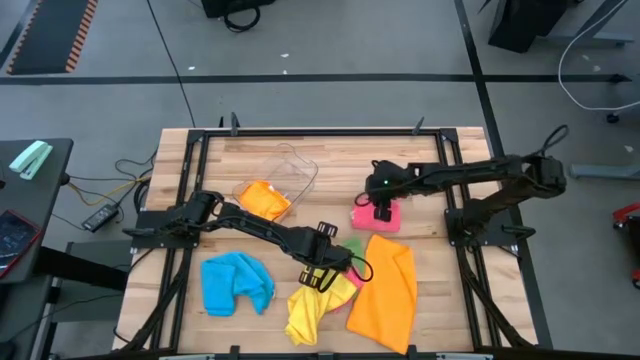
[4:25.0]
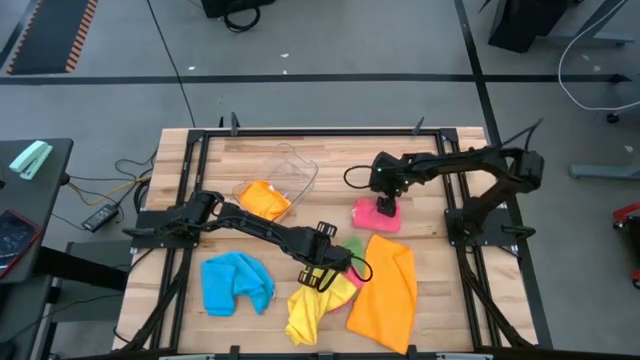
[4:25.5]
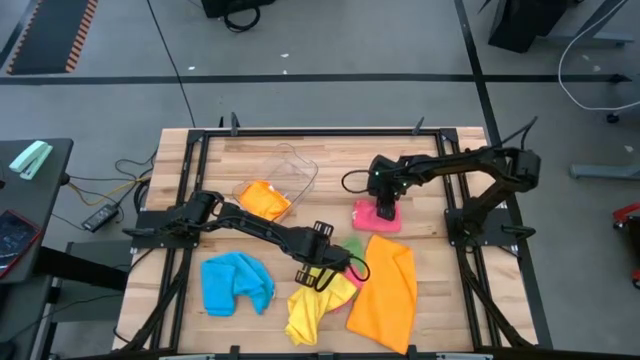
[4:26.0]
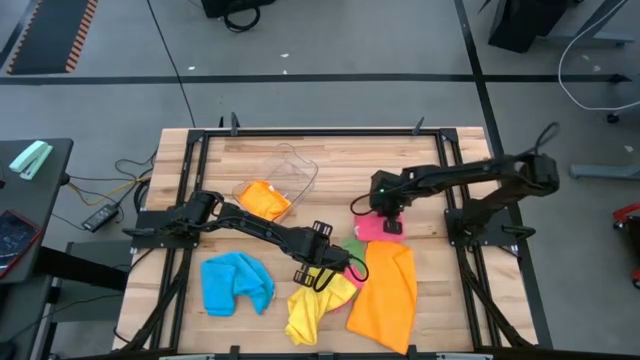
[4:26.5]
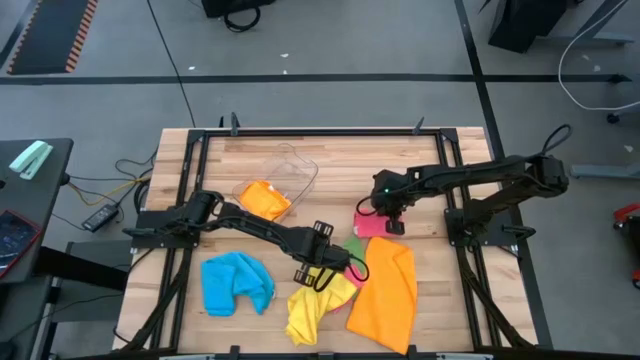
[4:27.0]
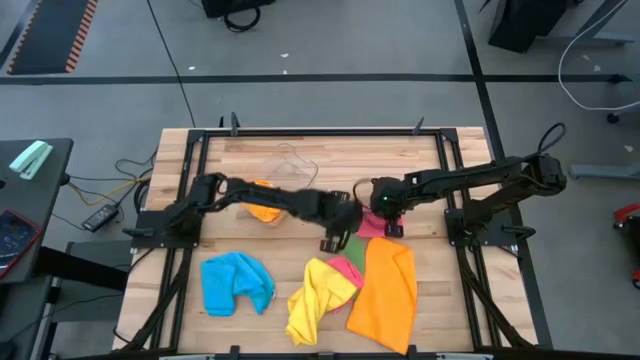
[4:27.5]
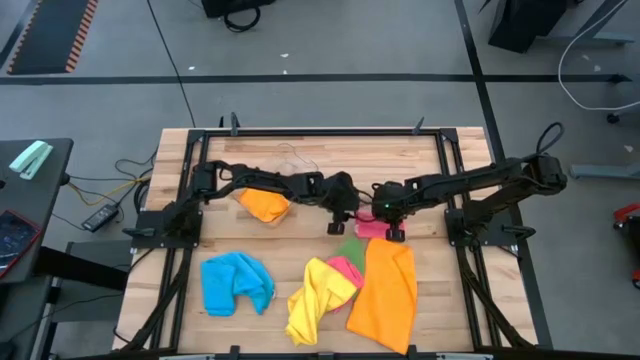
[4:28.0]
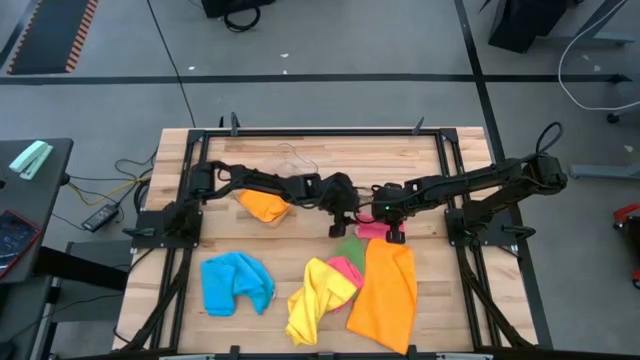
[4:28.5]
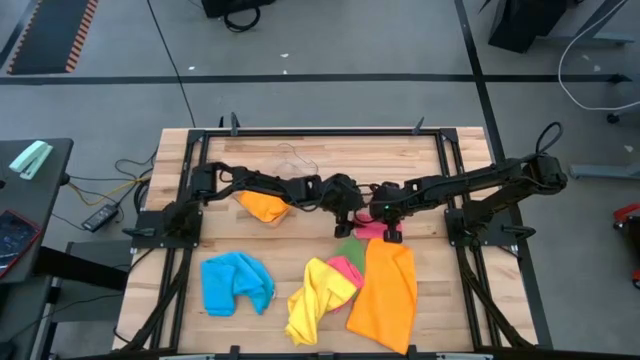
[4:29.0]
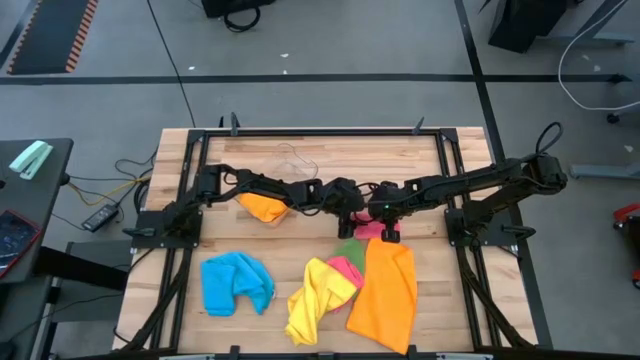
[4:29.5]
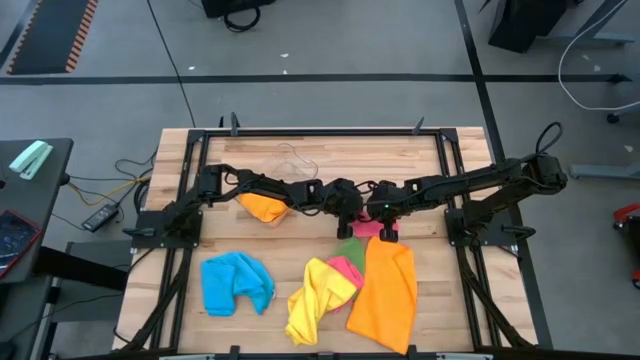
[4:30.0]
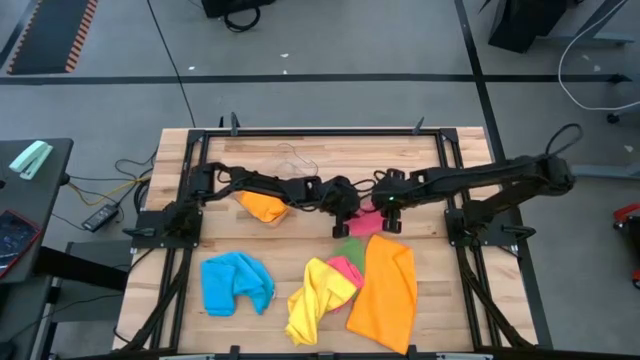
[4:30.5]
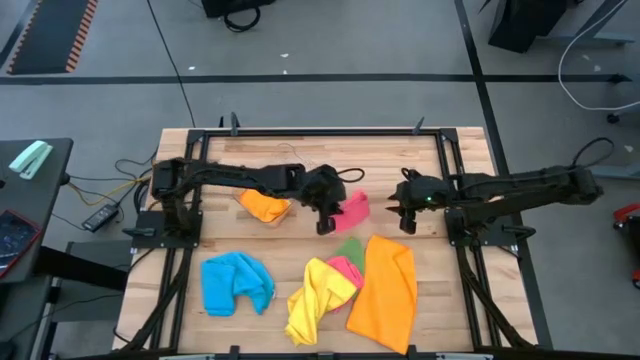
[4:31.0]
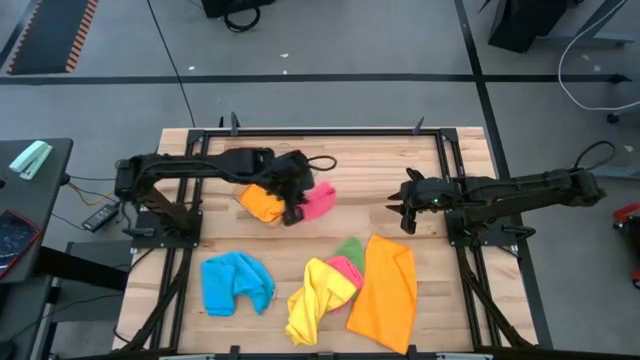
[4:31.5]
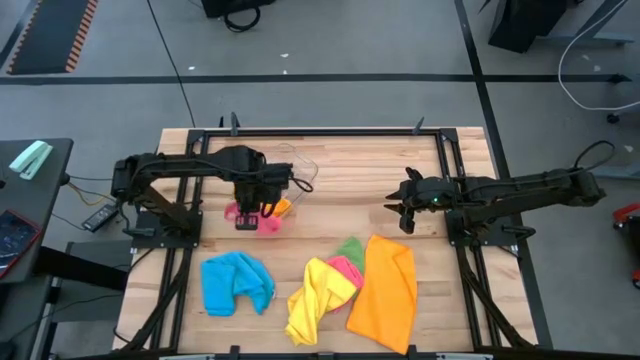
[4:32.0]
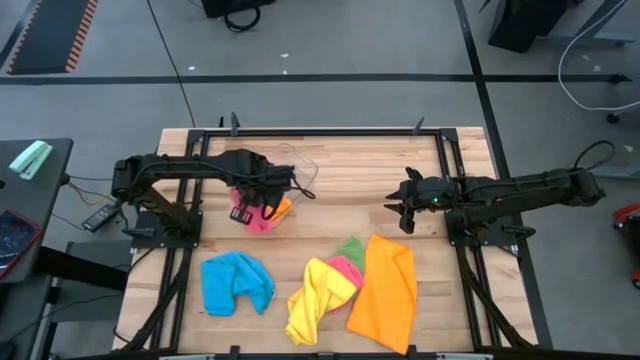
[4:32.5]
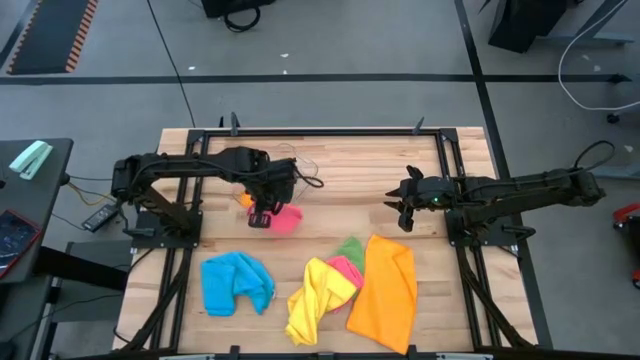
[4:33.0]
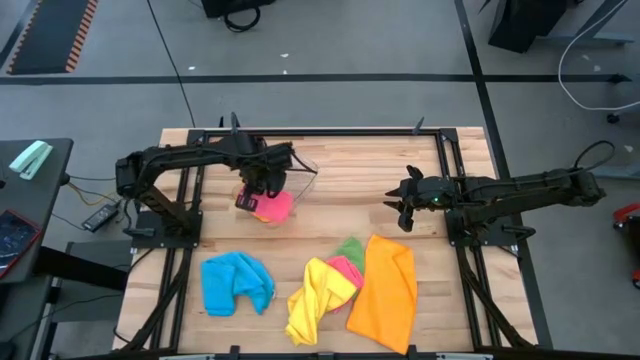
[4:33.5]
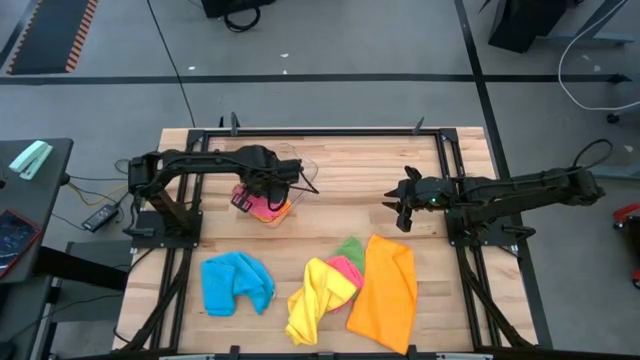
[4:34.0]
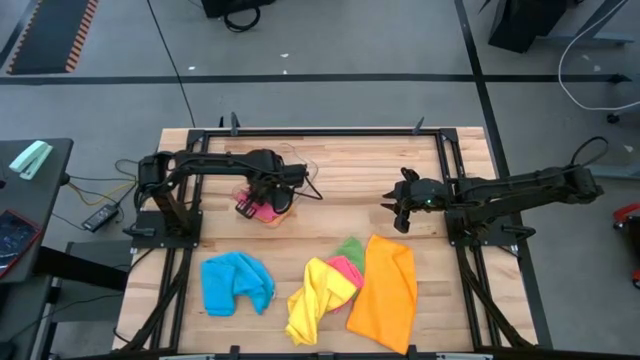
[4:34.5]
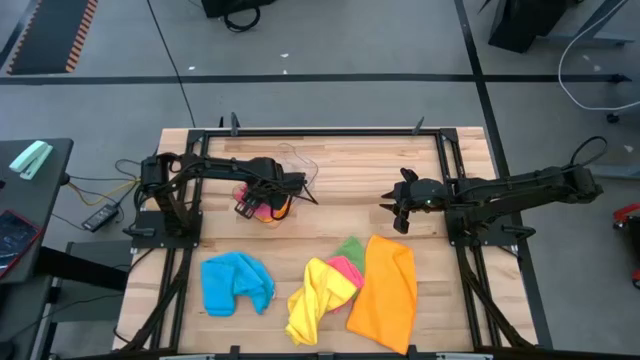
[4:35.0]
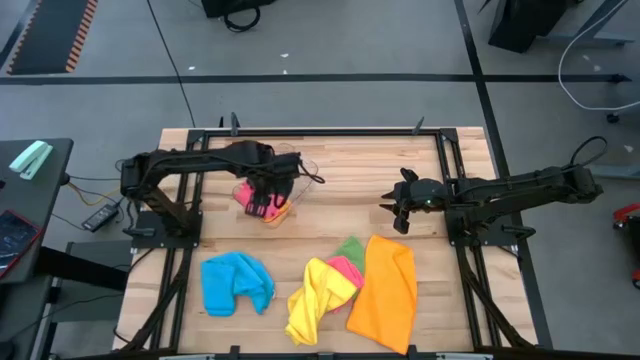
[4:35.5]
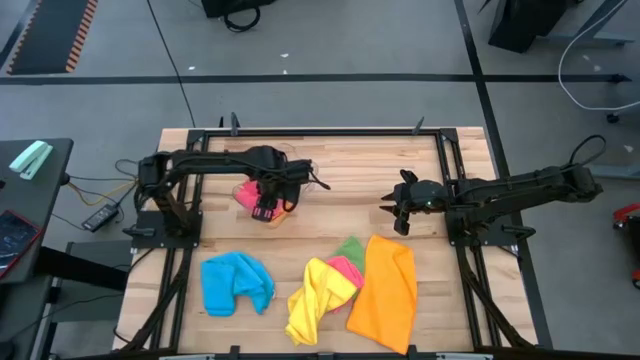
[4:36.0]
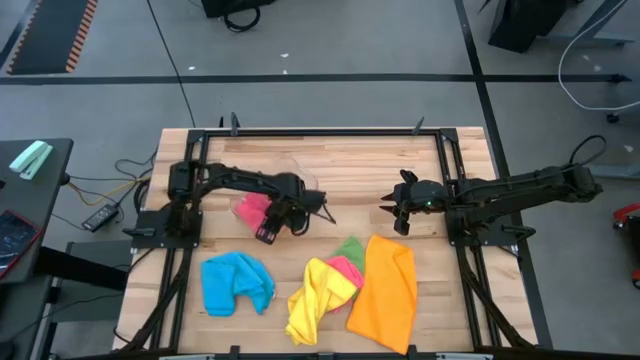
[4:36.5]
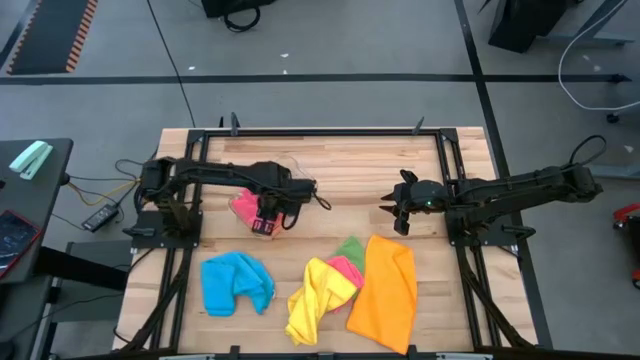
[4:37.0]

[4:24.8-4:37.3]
Task: Fold microfiber towels
Put the folded pink microfiber towel into the transparent bin

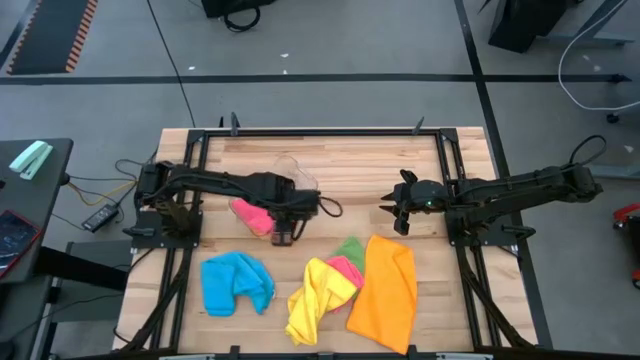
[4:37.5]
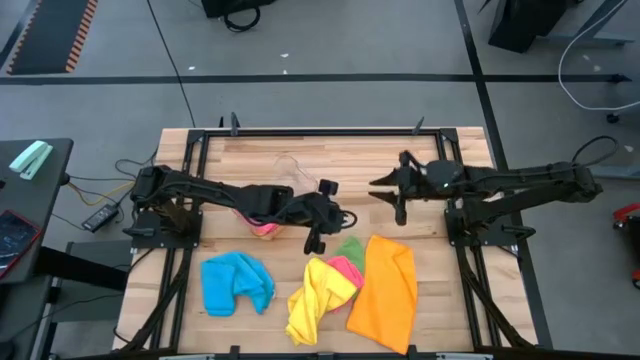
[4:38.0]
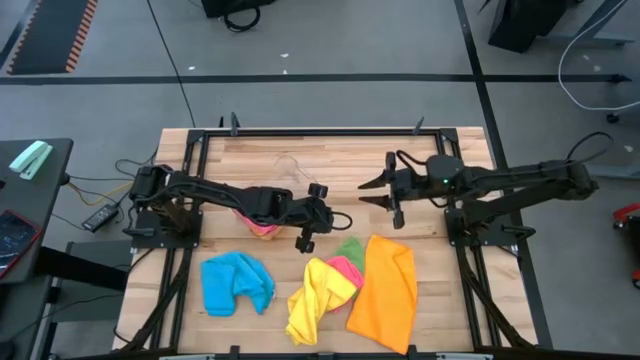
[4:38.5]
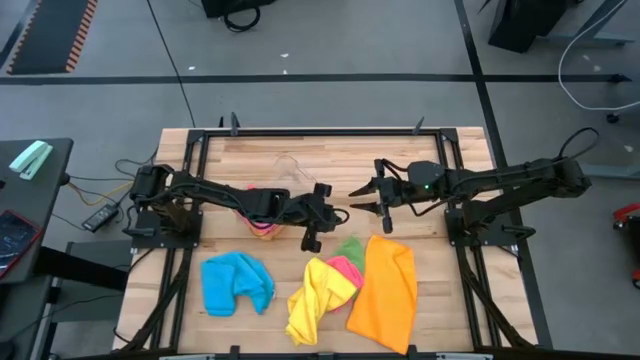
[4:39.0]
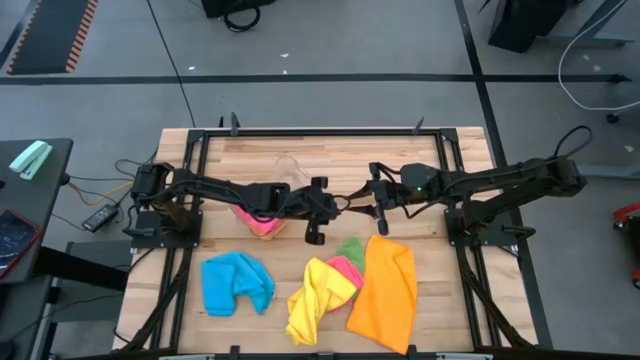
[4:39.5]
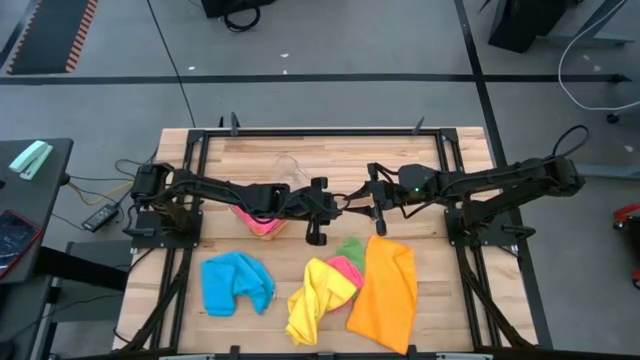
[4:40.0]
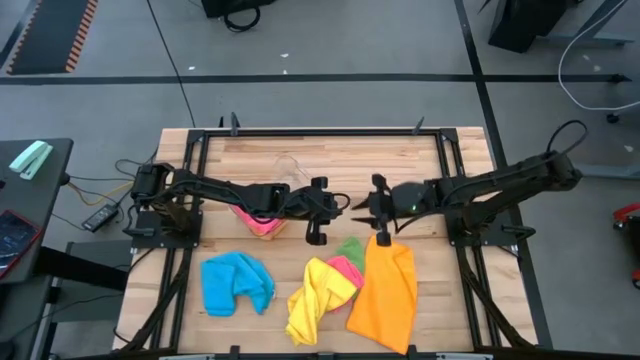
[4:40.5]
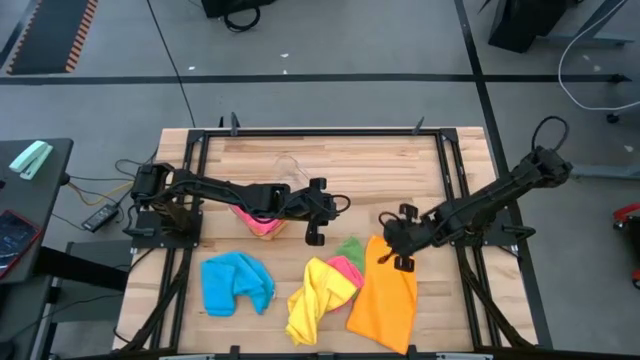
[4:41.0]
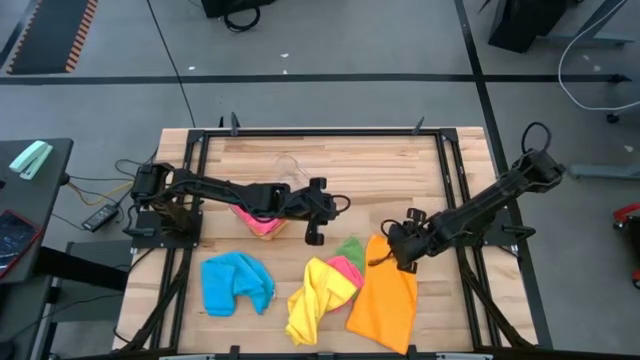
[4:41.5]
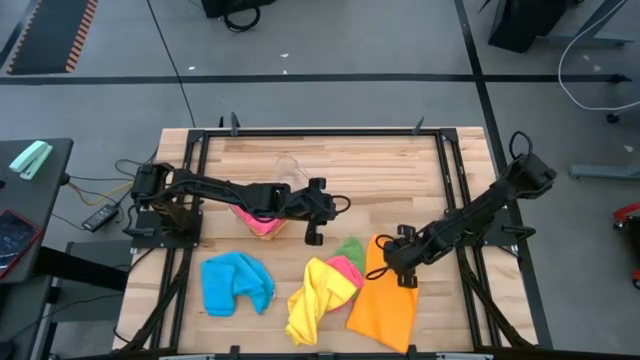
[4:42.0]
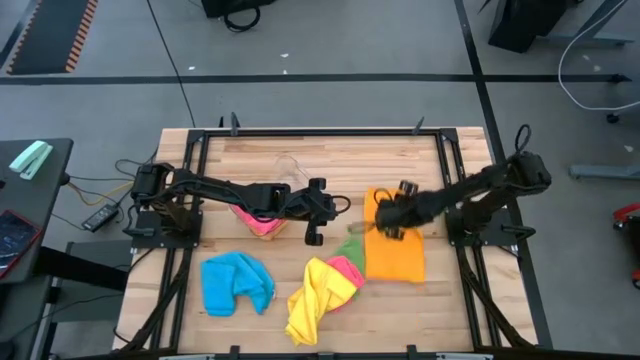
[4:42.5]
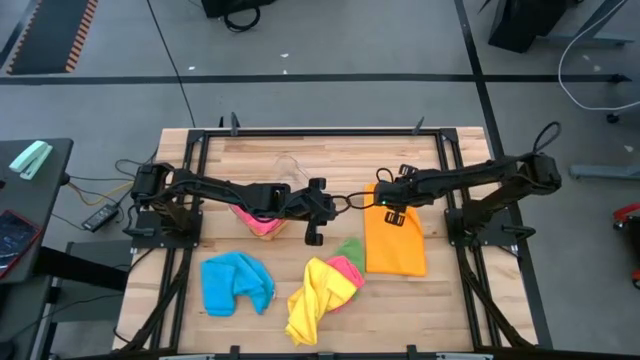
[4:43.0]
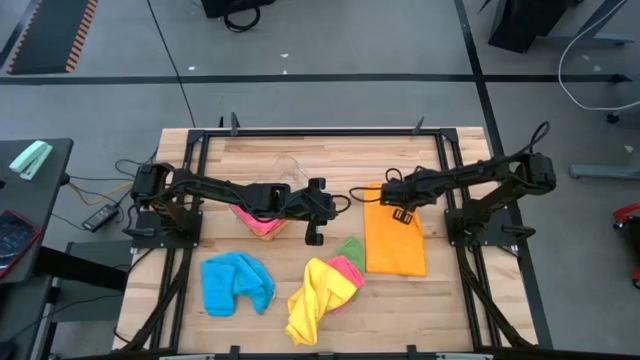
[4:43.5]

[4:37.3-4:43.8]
Fold the orange microfiber towel

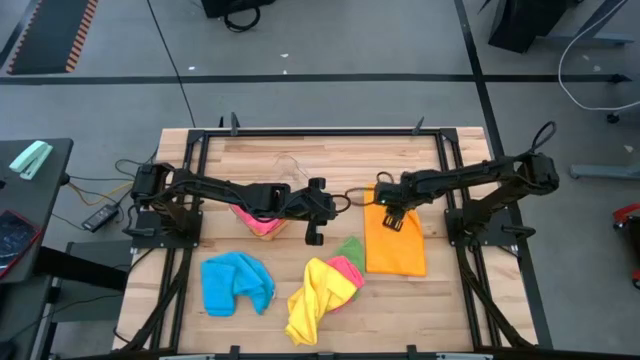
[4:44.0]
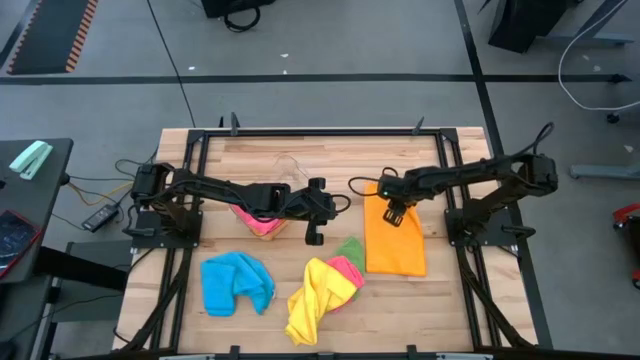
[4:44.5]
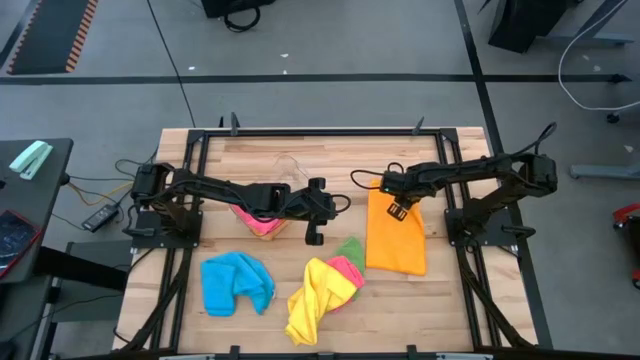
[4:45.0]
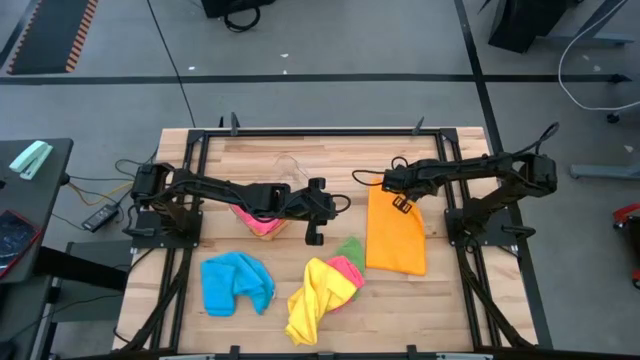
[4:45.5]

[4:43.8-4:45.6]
Fold the orange microfiber towel
